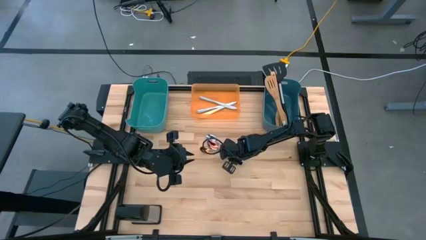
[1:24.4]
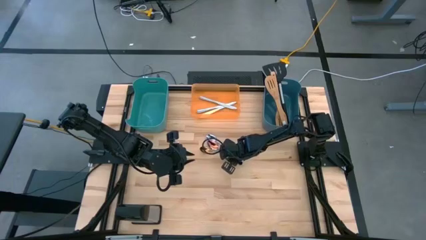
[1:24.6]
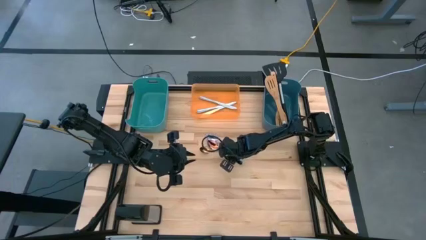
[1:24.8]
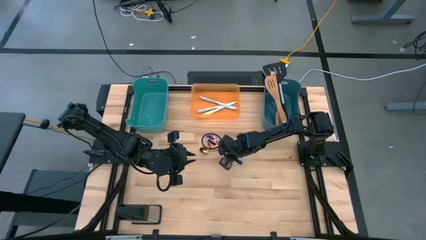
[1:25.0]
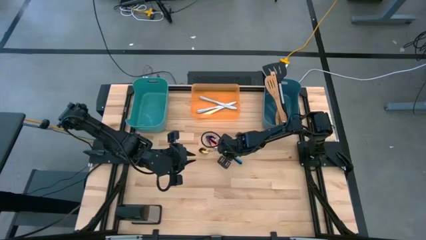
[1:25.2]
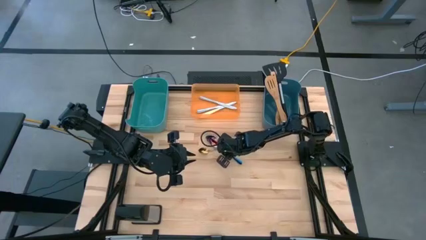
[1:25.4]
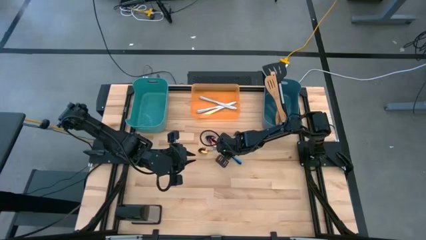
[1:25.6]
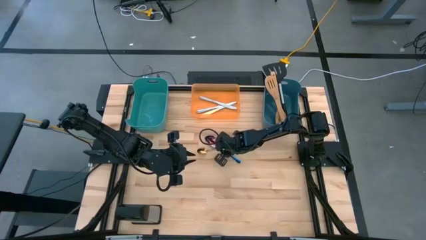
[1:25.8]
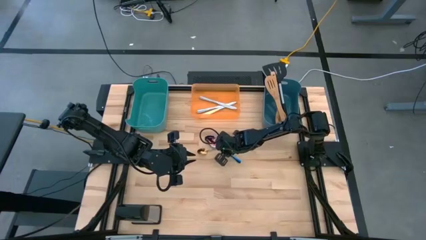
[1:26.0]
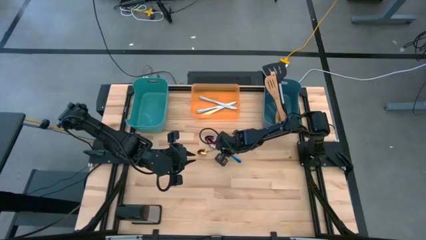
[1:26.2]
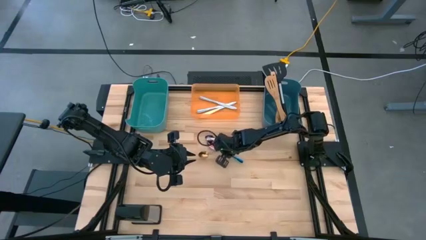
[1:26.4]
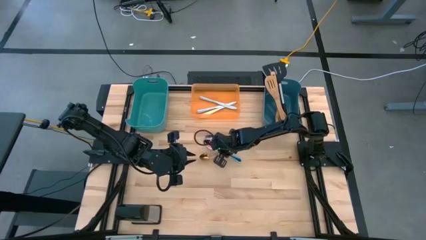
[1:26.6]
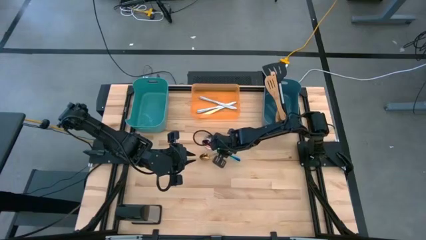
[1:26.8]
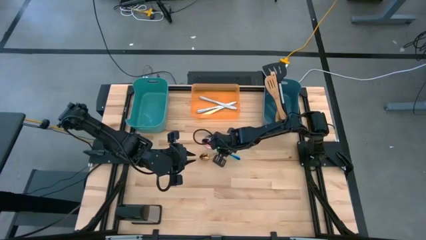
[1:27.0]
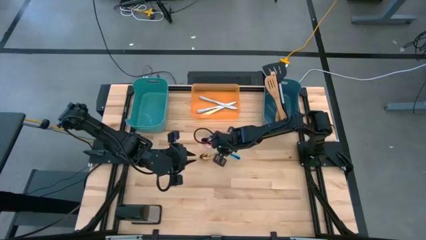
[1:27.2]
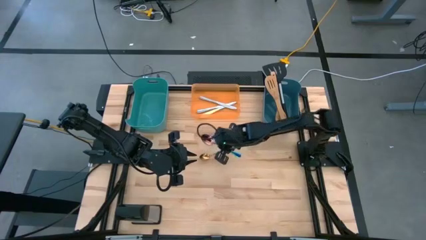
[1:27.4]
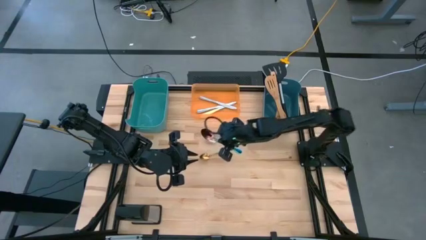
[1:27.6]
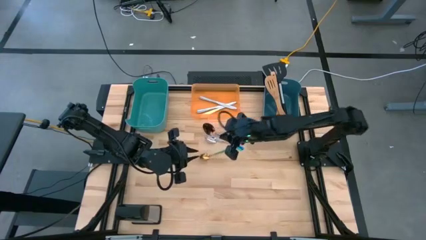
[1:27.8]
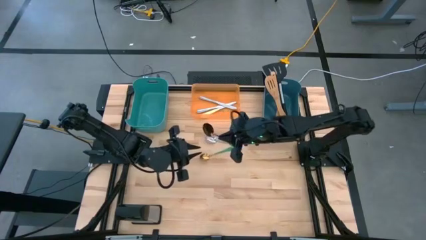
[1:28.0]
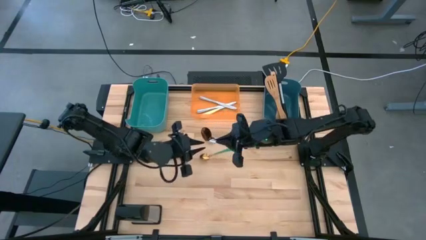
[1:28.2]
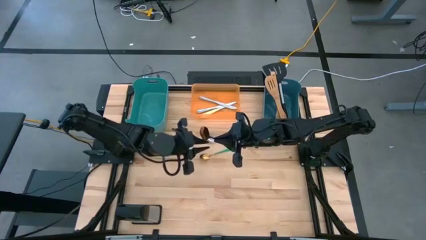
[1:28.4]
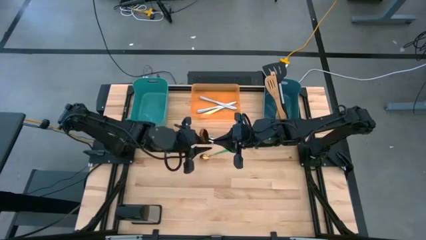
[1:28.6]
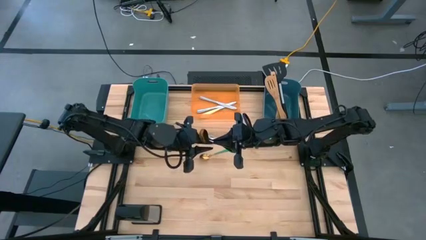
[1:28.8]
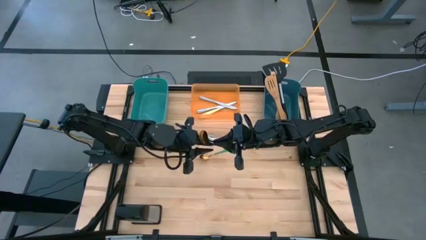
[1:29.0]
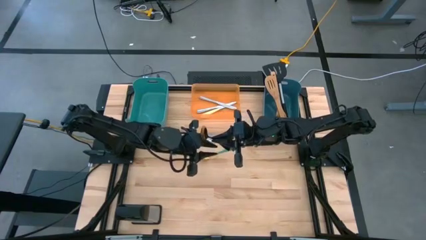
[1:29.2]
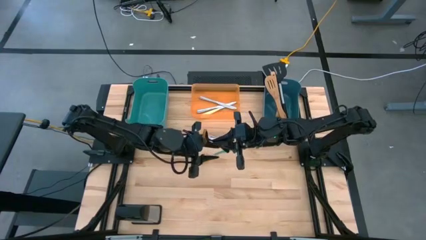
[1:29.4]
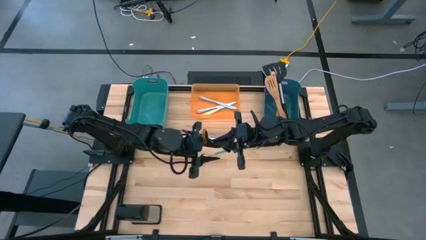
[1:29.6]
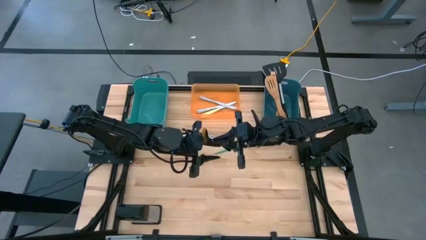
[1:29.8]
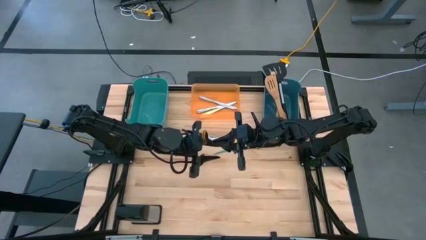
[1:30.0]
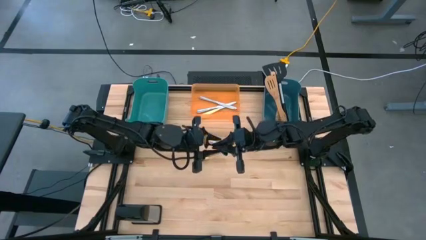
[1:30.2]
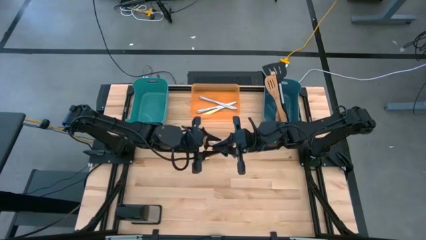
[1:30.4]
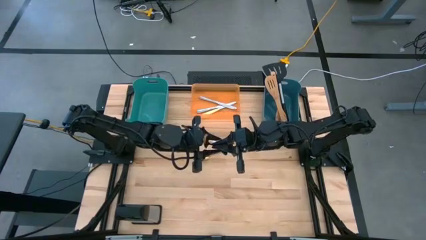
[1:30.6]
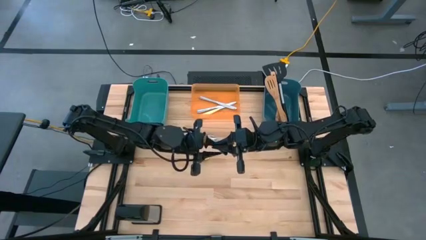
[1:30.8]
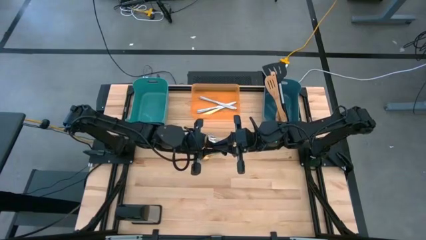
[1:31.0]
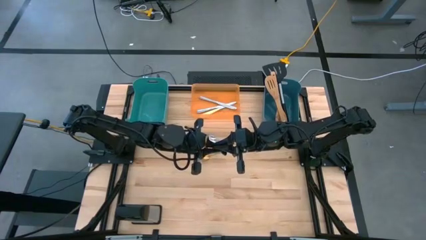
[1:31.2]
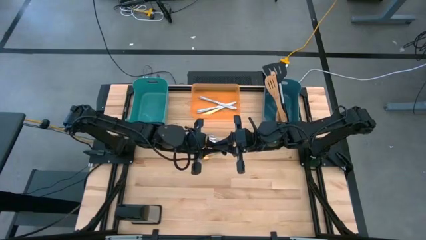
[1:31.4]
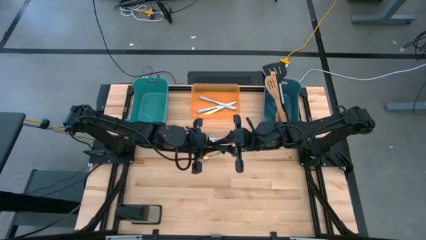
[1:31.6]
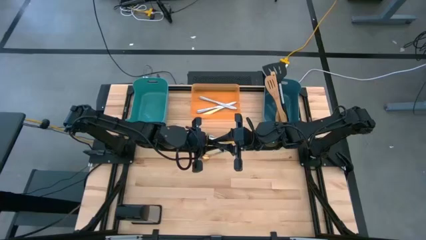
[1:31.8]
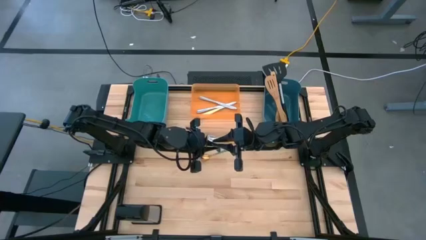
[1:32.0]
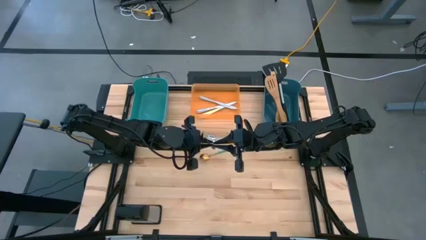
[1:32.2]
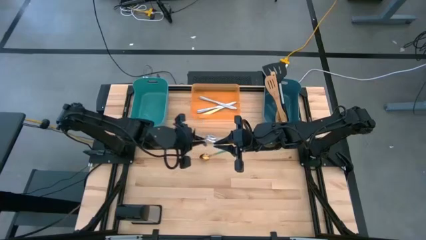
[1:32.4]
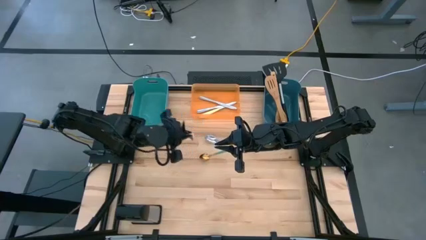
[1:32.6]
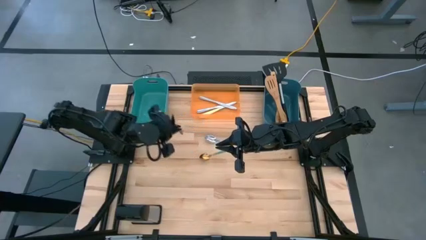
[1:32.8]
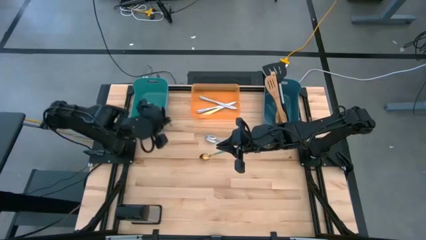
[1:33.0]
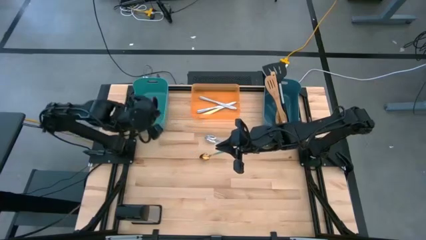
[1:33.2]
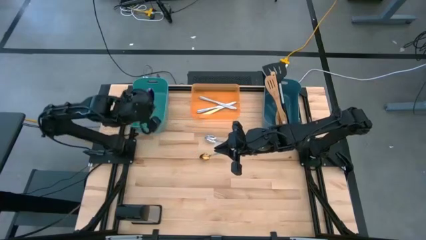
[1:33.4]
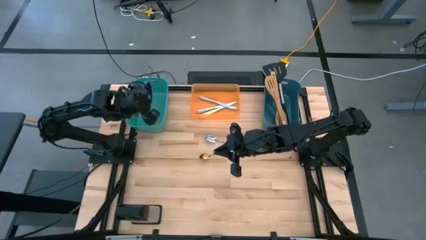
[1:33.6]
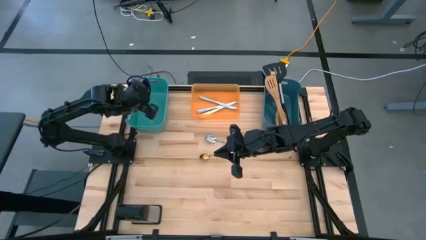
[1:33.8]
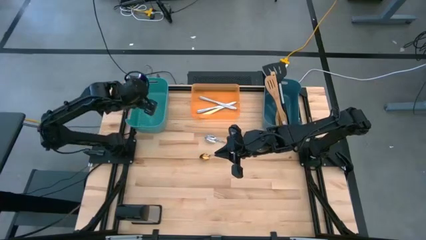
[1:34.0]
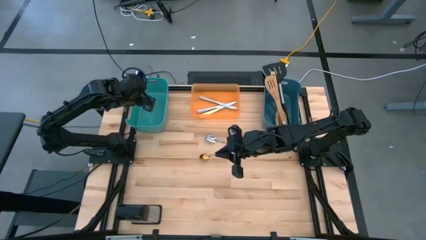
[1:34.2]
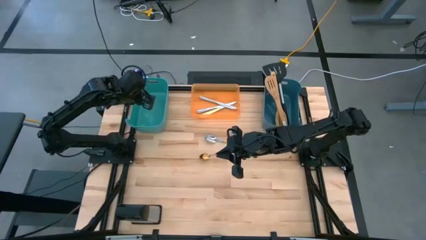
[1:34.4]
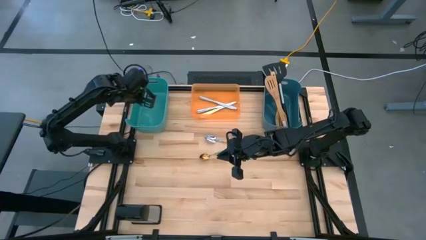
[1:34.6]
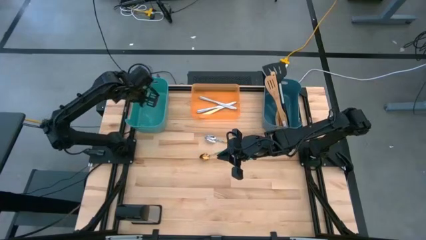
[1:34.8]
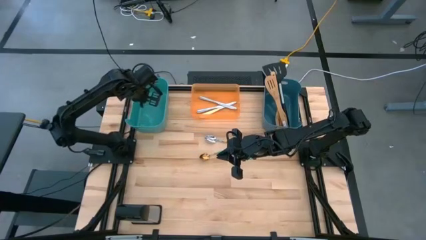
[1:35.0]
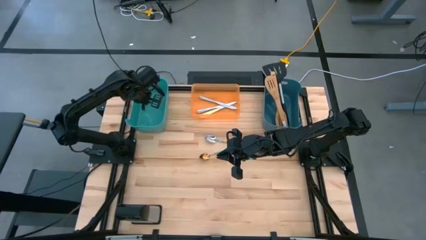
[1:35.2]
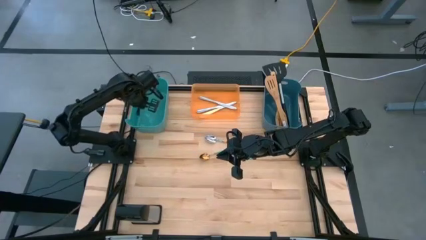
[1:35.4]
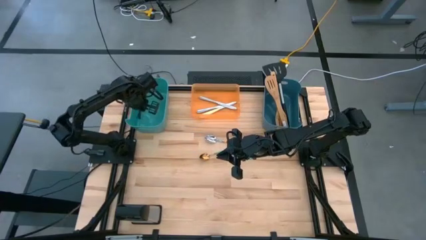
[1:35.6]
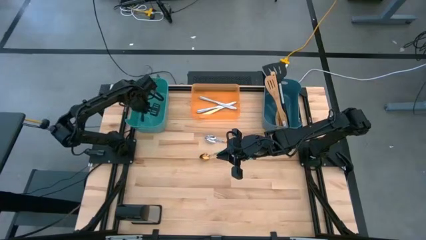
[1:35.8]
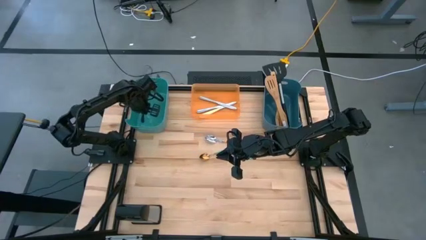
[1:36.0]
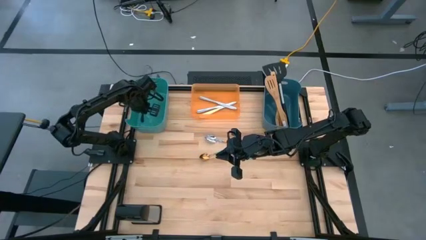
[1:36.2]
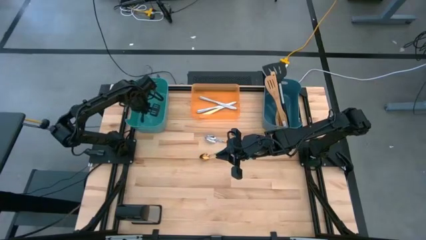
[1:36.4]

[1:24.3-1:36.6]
Task: Pick & Place Kitchen Items
Put the blue spoon into the green bin
